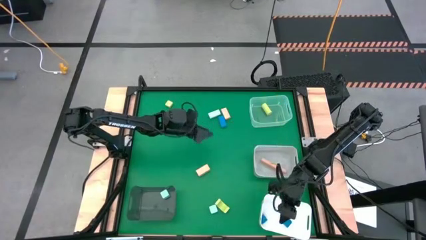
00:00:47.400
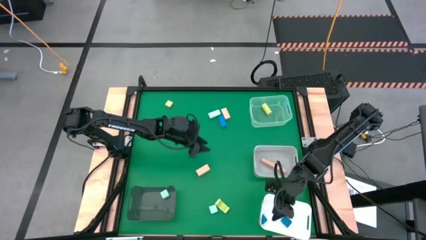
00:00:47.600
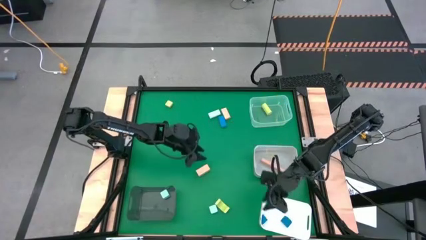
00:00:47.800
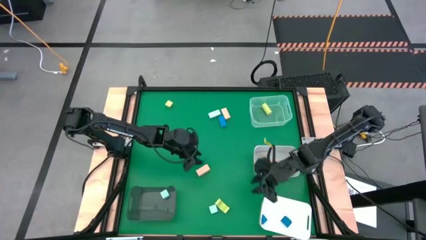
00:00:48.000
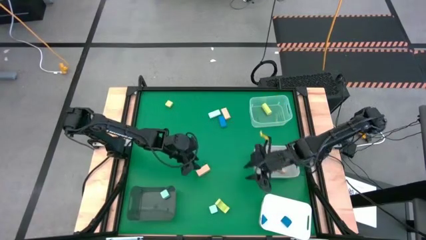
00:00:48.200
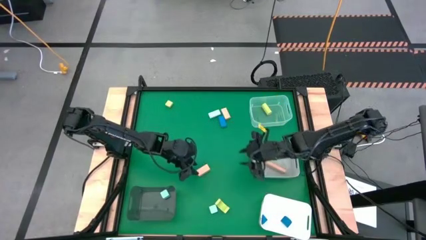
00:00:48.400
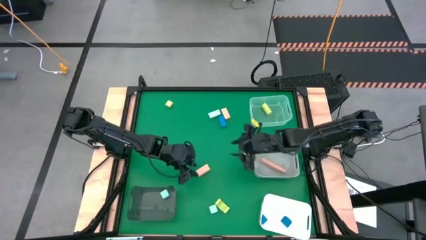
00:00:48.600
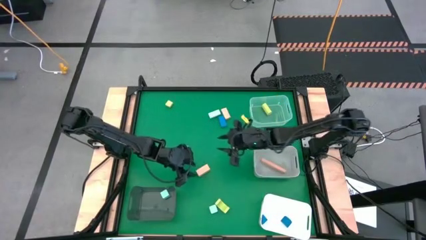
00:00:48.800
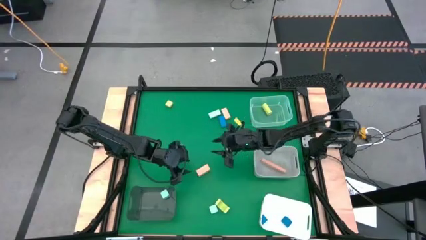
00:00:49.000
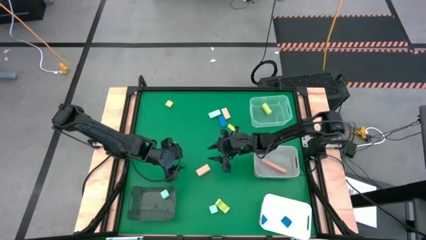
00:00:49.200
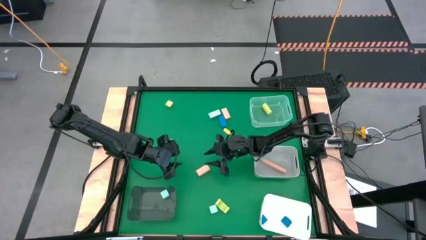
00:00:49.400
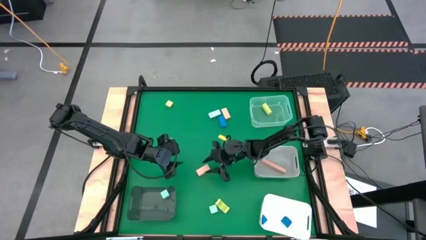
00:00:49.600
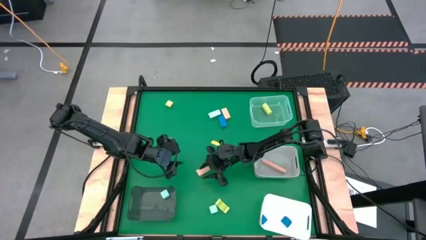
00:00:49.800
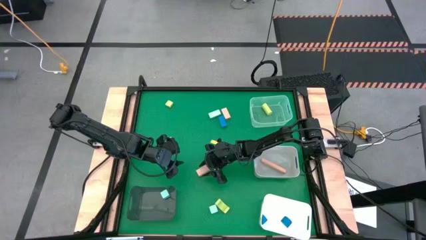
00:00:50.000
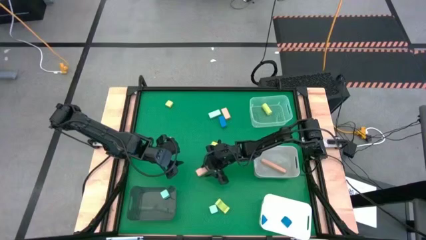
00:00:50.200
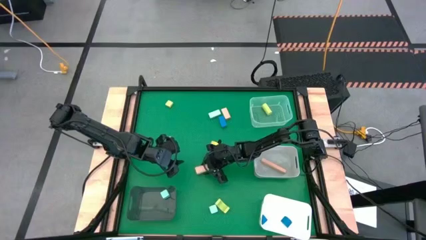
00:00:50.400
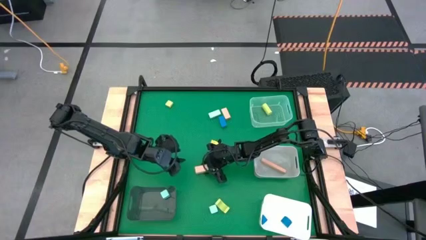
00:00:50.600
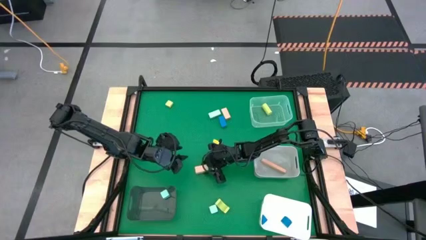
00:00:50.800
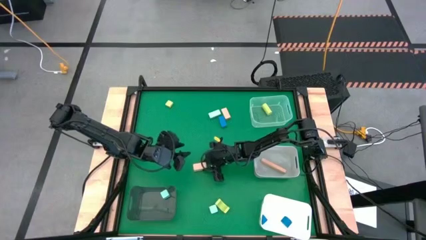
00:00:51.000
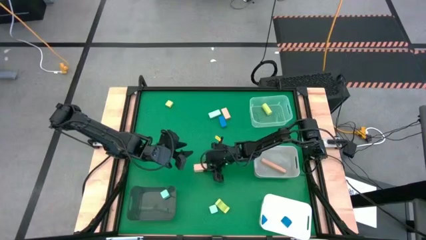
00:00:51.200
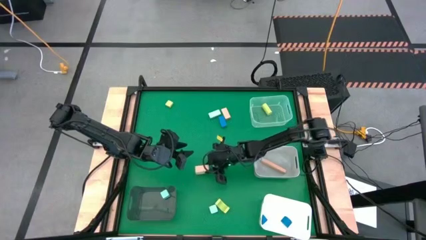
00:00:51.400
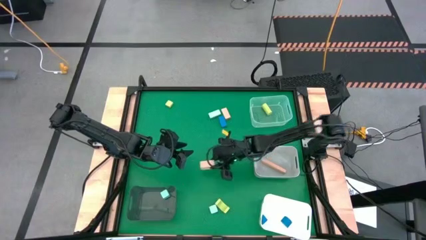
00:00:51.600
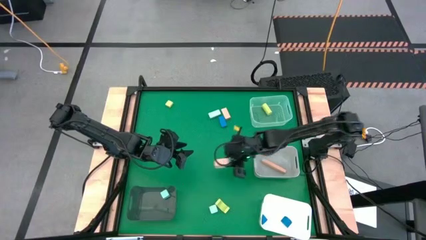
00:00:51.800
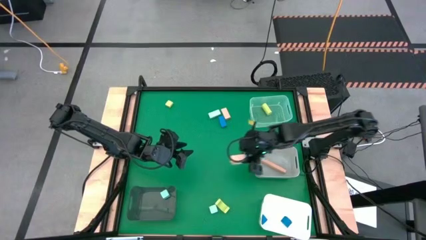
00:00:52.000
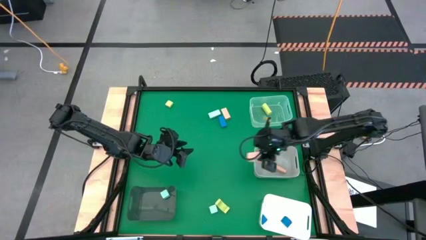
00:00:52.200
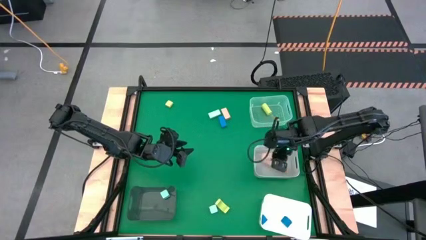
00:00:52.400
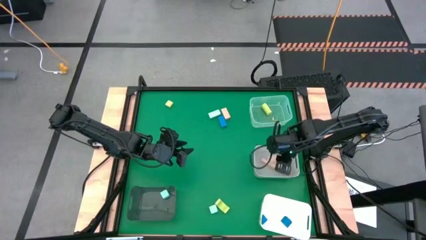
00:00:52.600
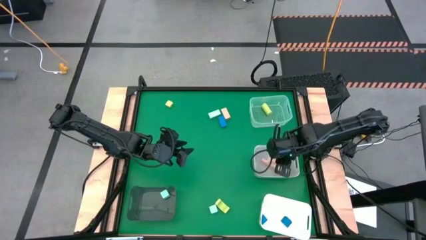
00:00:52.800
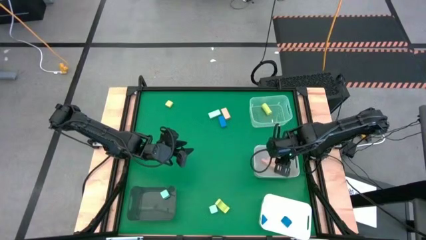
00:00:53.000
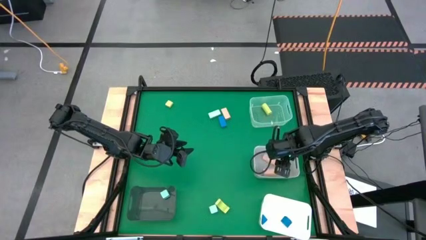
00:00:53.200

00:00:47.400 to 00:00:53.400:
Task: Sort & place blocks by color
Put the bottom pink block into the gray bin

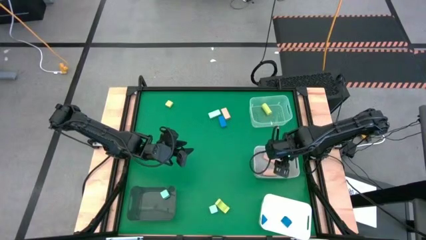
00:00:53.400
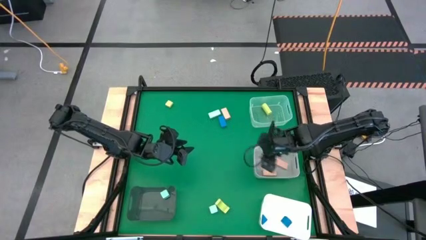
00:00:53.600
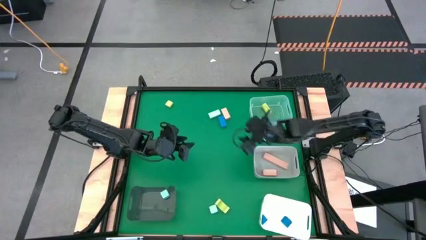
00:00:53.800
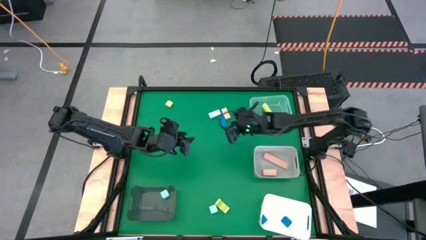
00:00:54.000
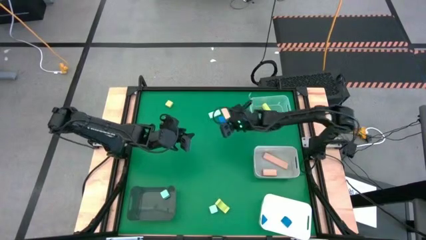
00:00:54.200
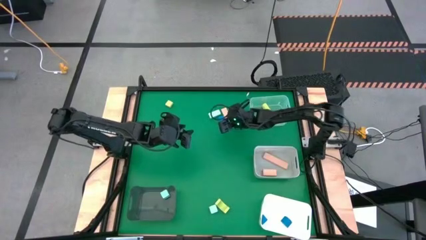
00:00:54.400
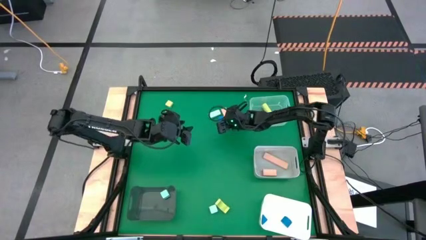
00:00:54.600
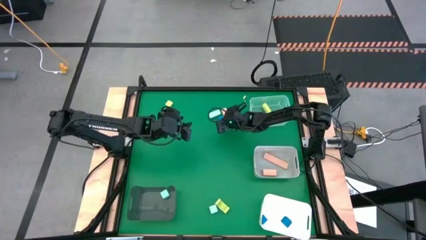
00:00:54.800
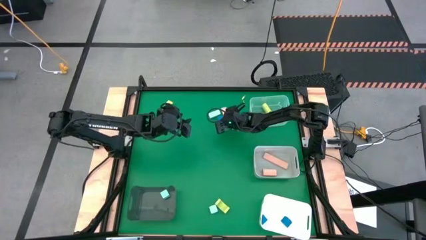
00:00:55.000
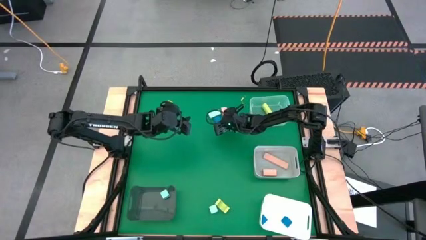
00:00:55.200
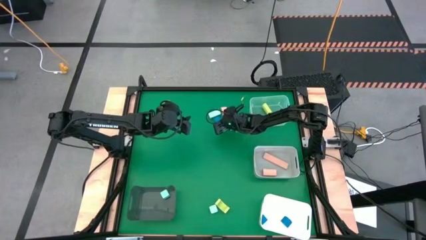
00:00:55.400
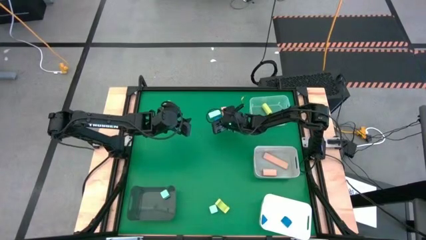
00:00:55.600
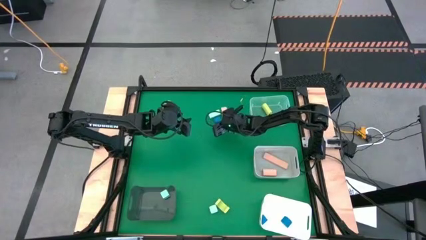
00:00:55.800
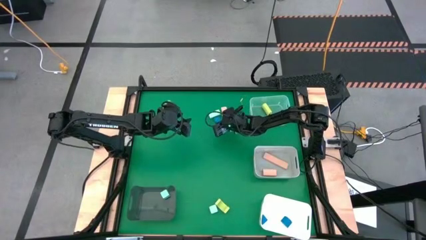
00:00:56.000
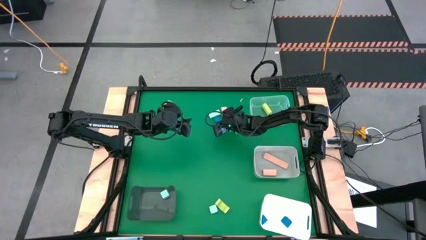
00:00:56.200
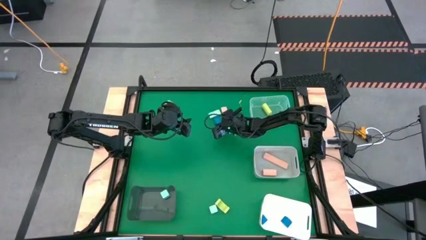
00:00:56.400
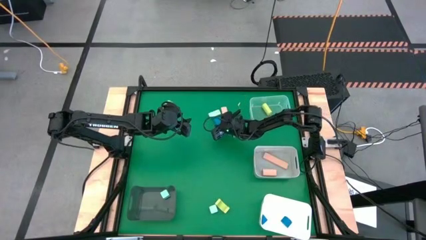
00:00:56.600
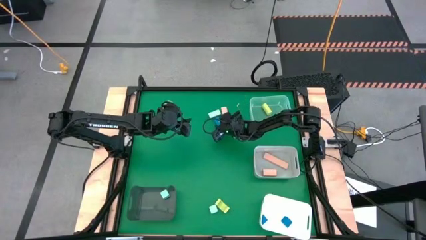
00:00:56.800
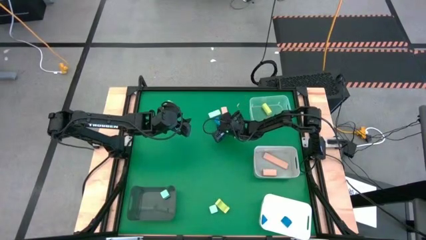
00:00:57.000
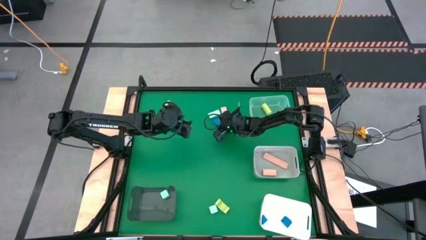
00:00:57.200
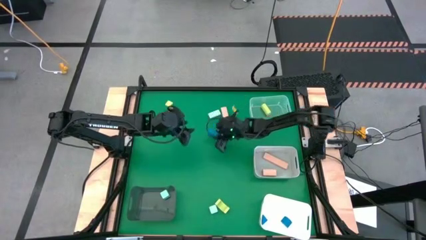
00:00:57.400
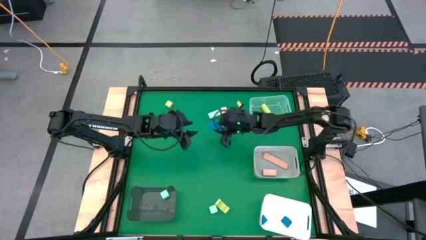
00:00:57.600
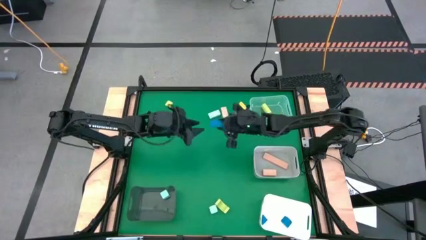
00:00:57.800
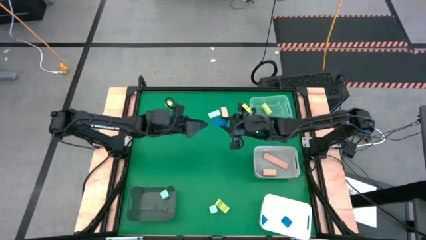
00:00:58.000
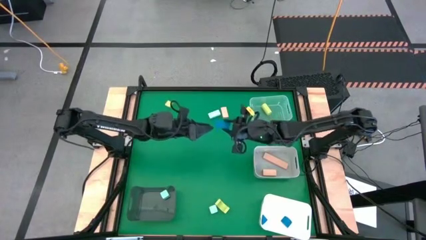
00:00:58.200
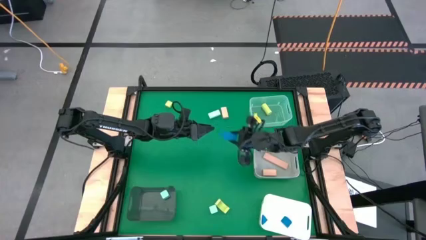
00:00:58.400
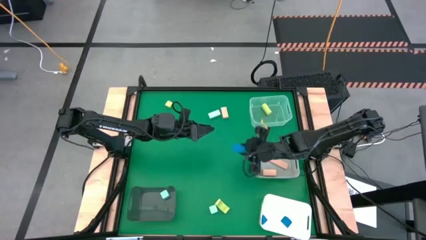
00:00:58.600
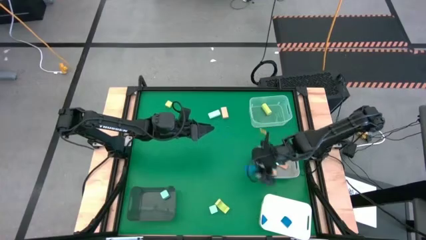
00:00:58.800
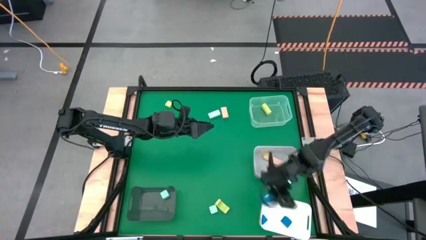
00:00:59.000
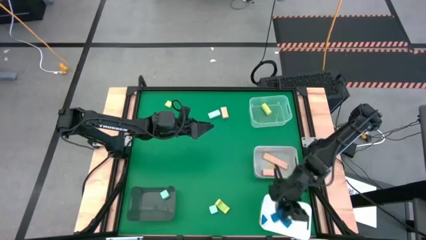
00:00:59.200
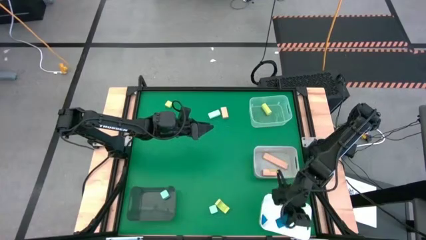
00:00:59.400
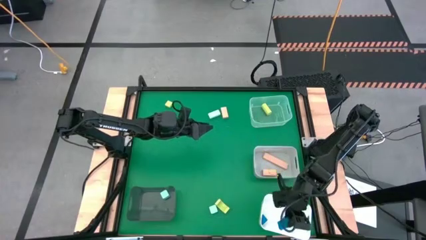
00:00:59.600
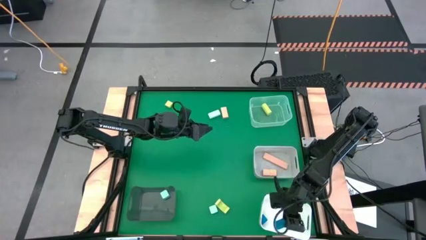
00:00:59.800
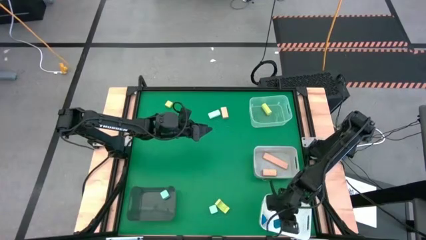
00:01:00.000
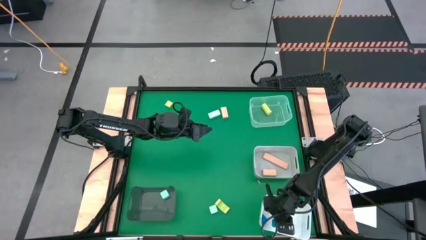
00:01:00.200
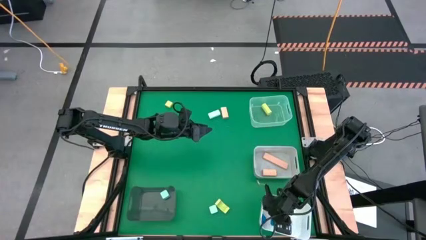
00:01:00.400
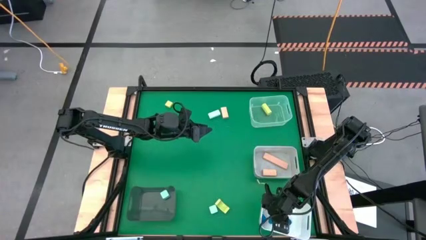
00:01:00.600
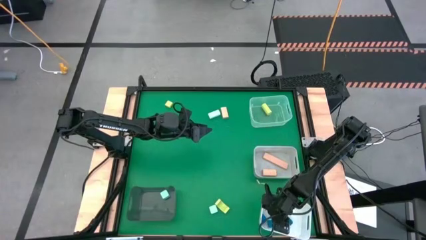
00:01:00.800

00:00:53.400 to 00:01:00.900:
Put the blue block into the white bin

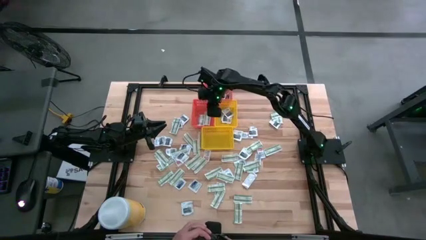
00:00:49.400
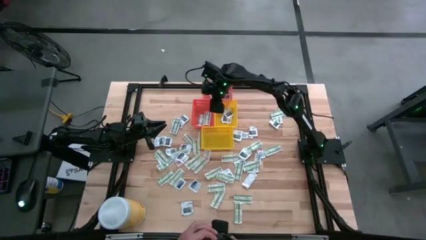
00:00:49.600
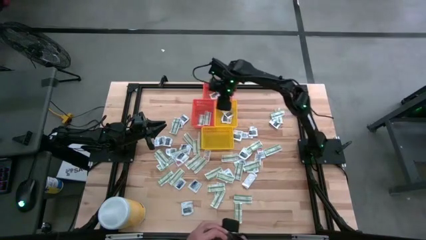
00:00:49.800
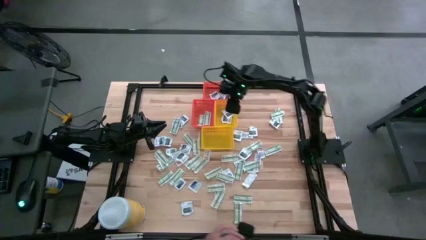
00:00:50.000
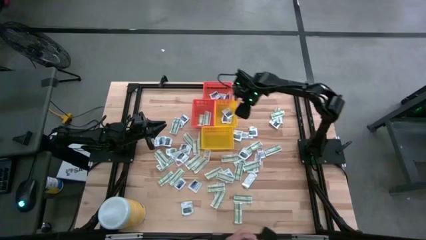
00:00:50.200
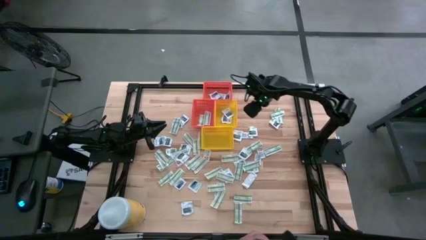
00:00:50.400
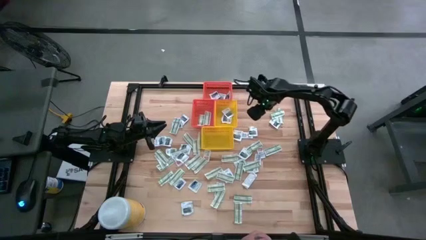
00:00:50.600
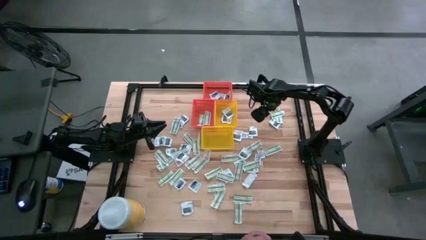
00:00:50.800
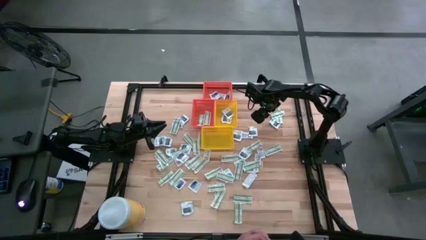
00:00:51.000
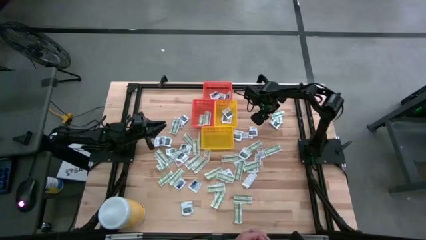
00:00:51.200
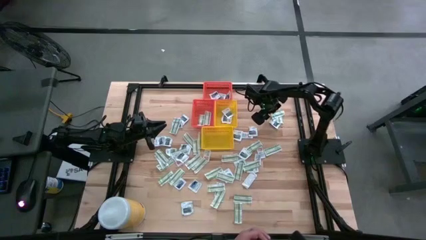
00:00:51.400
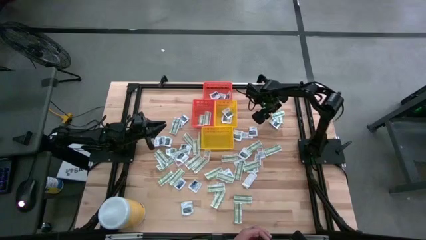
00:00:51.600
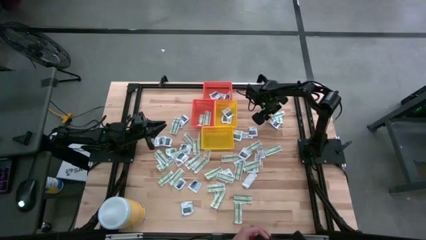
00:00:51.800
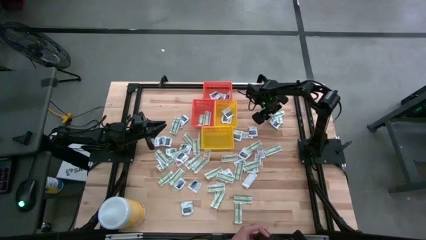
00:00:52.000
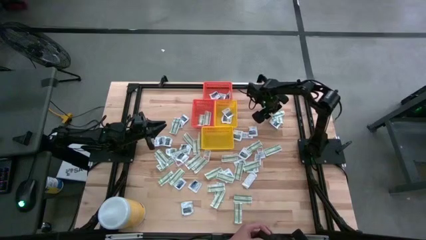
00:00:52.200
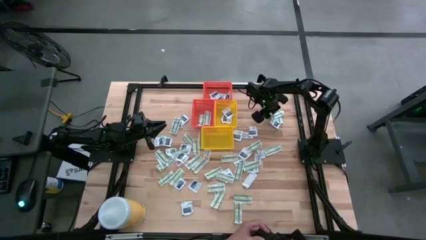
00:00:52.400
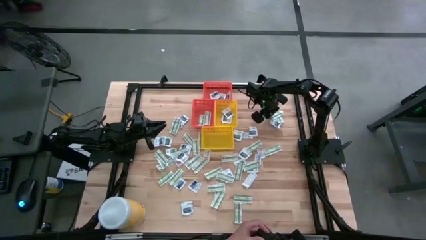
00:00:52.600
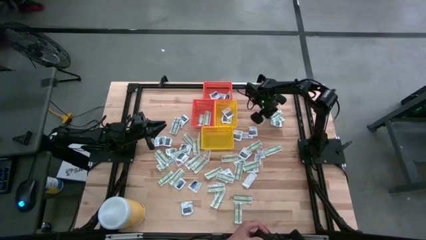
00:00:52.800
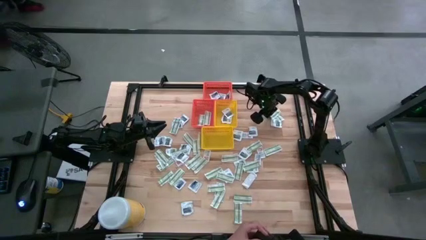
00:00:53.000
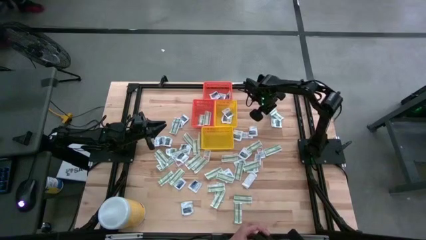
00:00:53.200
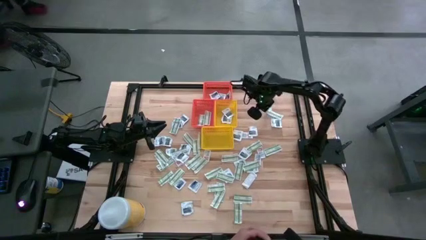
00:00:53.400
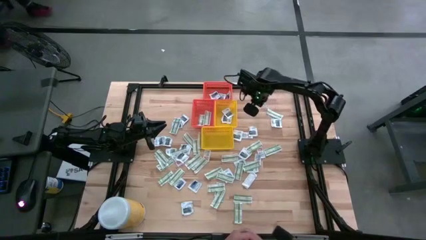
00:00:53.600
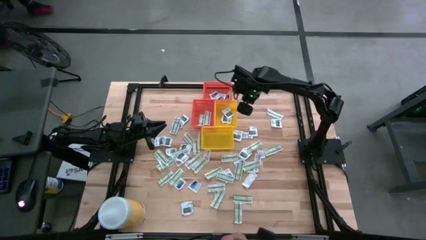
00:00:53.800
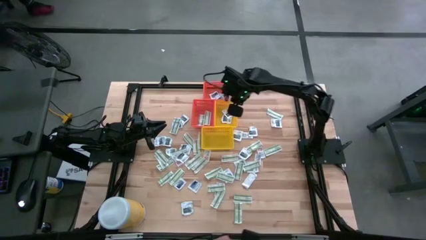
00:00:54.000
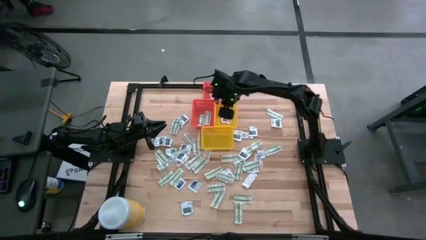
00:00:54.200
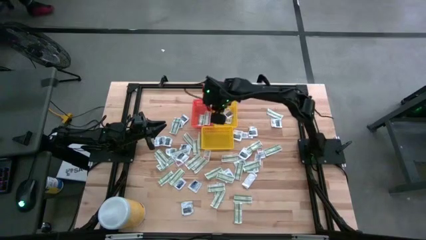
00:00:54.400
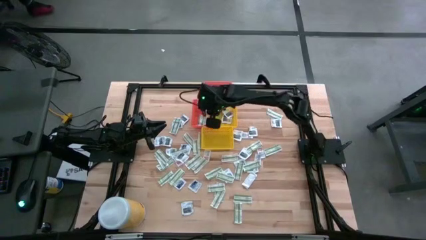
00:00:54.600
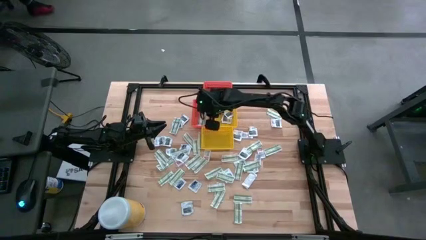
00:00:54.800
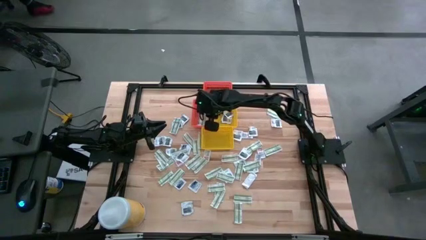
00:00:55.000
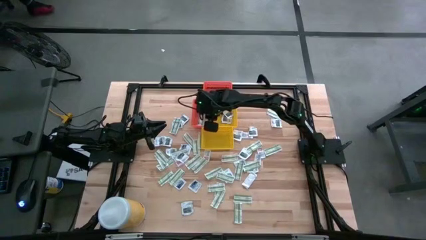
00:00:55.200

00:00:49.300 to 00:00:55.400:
Task: Pick & Place First Aid Supplies
Put the bandage into the bottom orange bin
